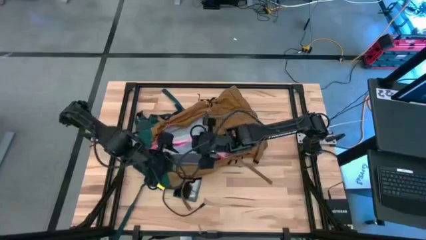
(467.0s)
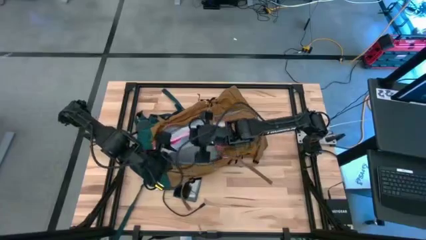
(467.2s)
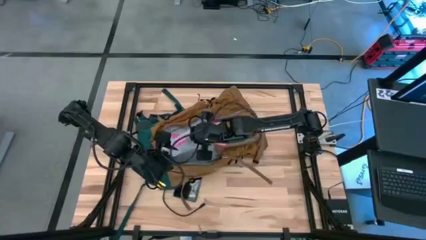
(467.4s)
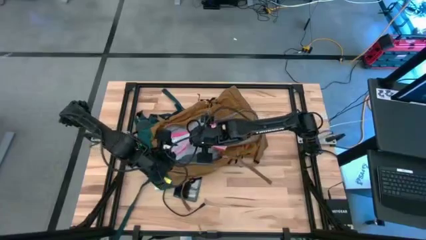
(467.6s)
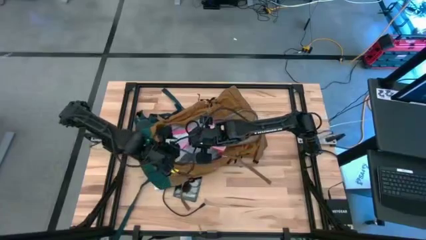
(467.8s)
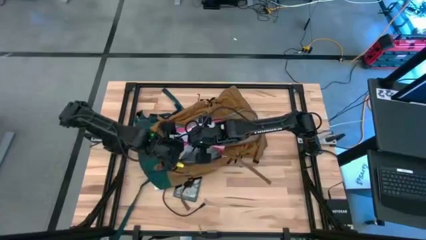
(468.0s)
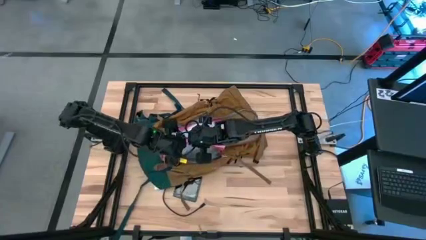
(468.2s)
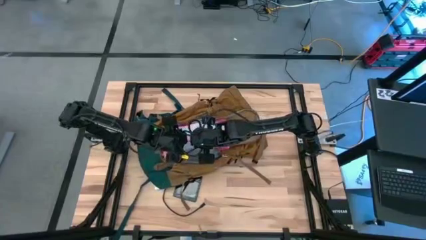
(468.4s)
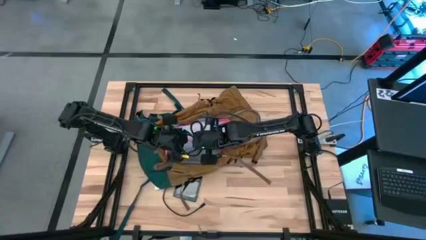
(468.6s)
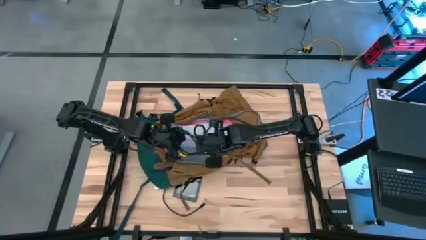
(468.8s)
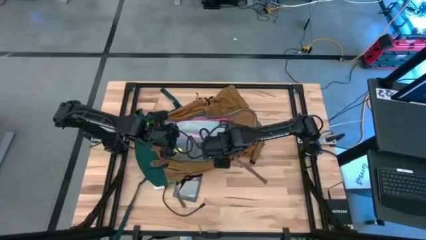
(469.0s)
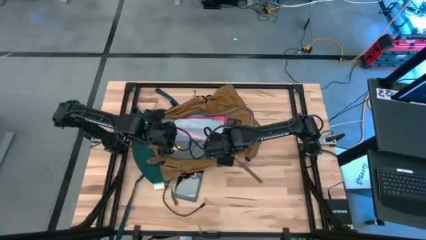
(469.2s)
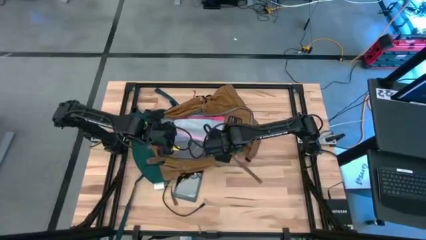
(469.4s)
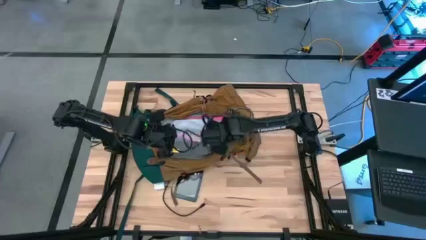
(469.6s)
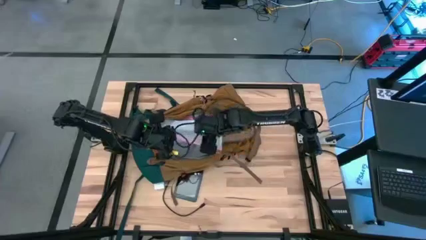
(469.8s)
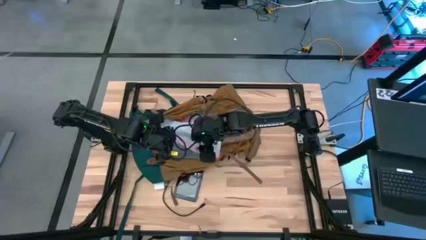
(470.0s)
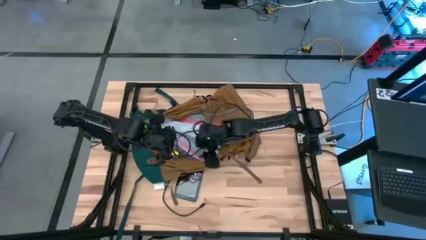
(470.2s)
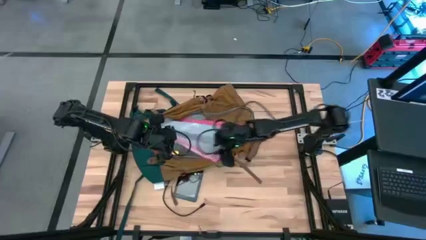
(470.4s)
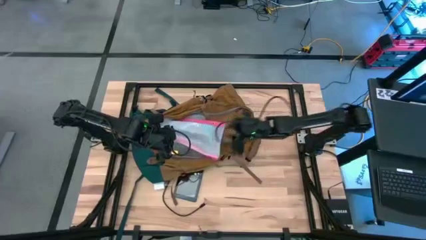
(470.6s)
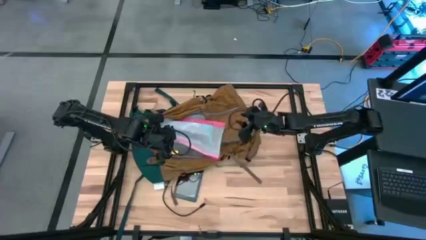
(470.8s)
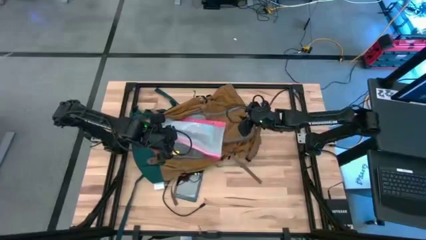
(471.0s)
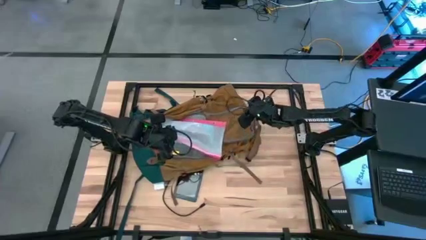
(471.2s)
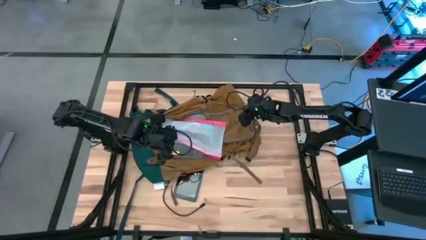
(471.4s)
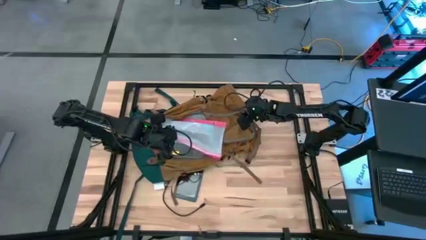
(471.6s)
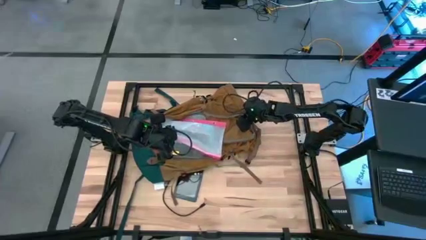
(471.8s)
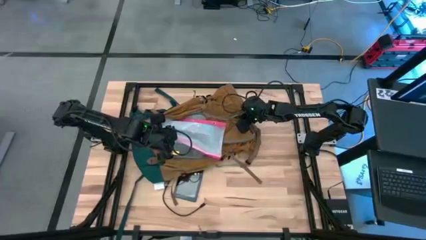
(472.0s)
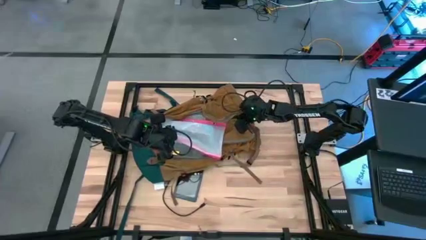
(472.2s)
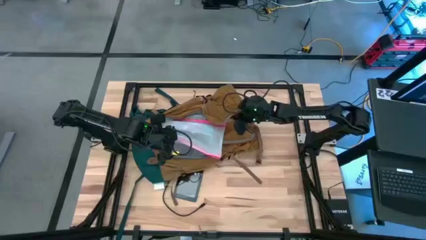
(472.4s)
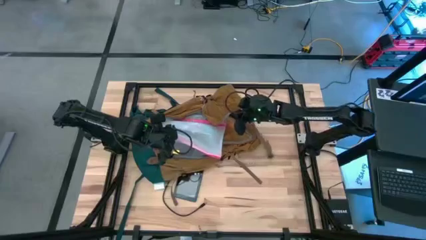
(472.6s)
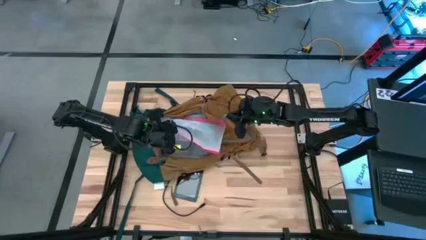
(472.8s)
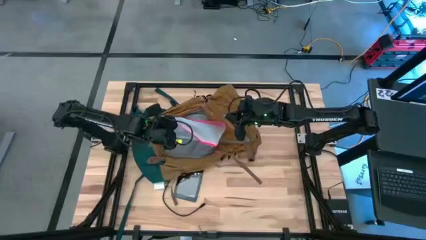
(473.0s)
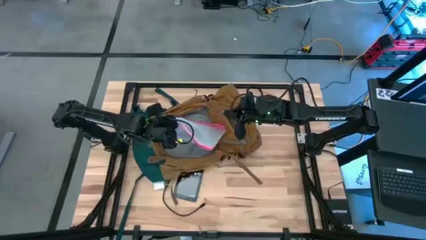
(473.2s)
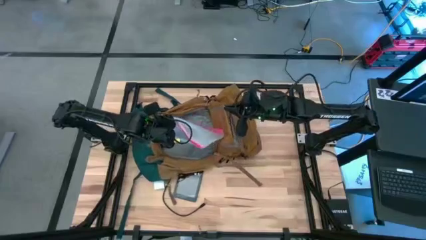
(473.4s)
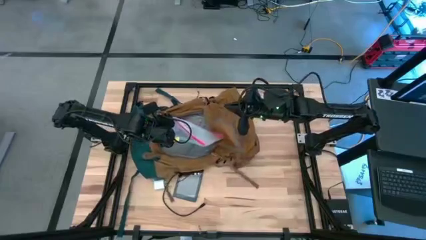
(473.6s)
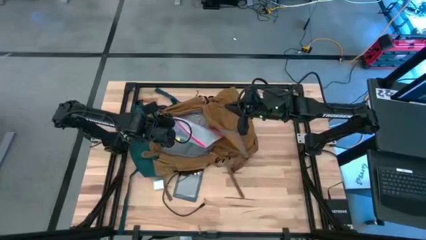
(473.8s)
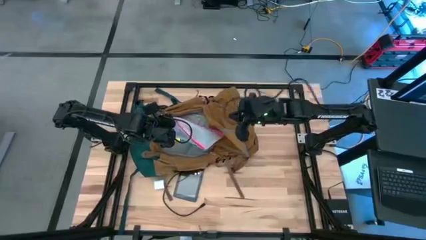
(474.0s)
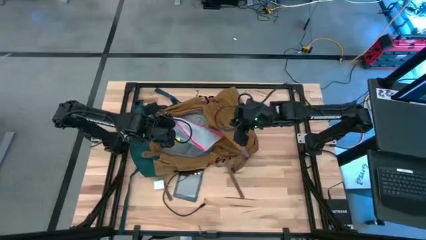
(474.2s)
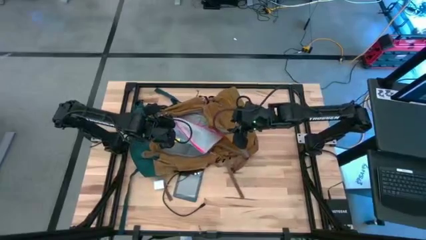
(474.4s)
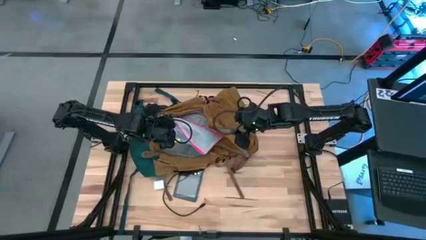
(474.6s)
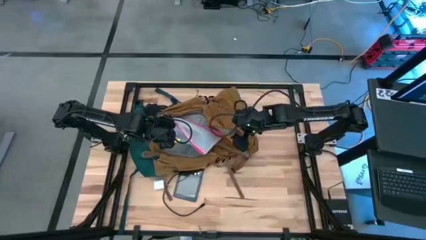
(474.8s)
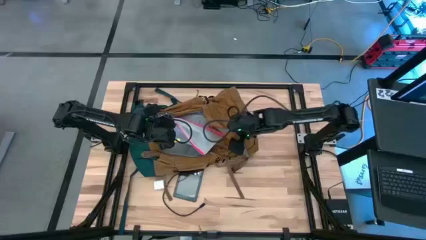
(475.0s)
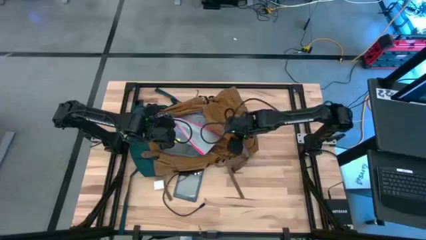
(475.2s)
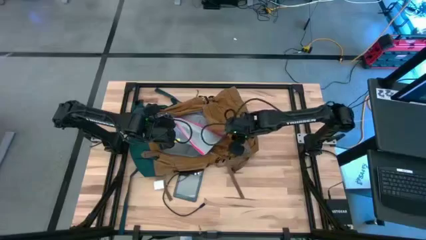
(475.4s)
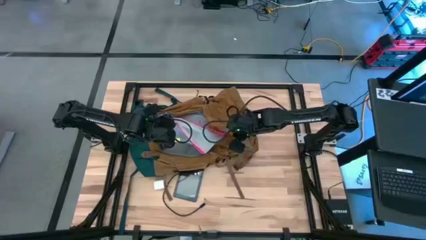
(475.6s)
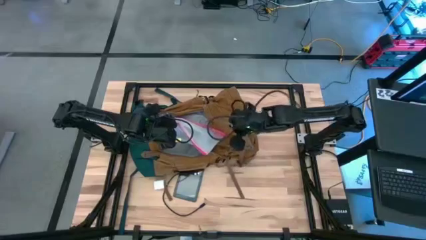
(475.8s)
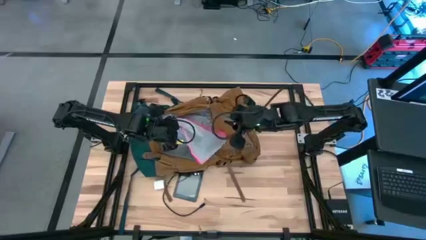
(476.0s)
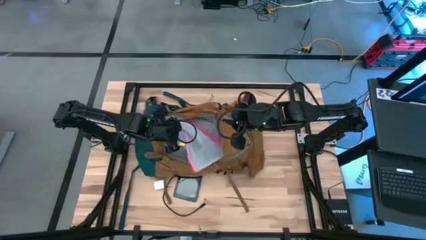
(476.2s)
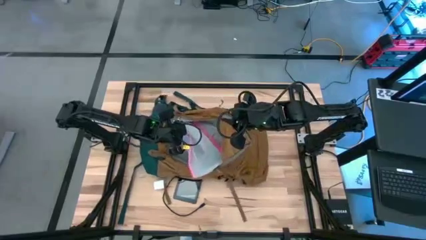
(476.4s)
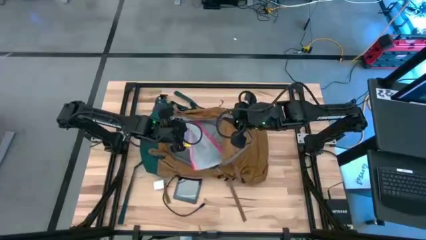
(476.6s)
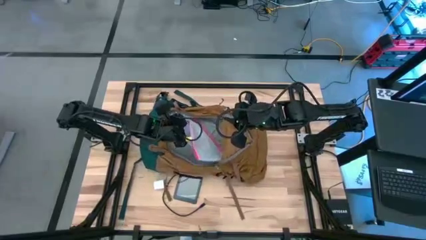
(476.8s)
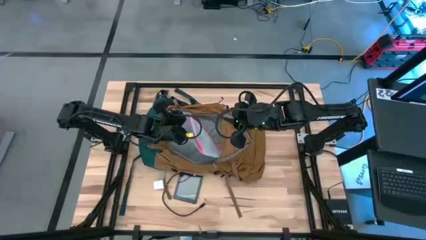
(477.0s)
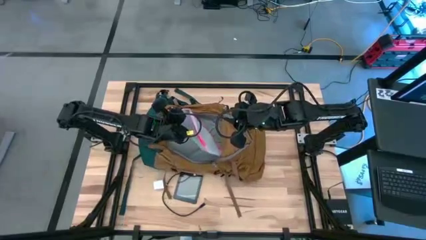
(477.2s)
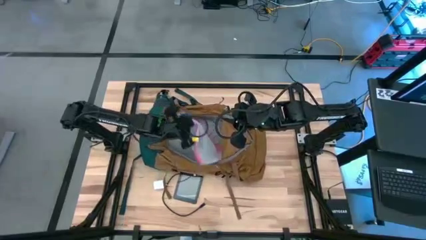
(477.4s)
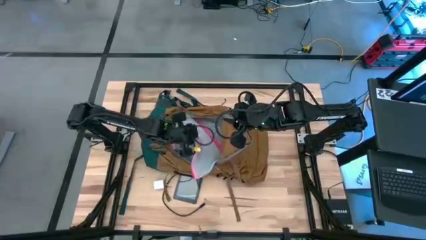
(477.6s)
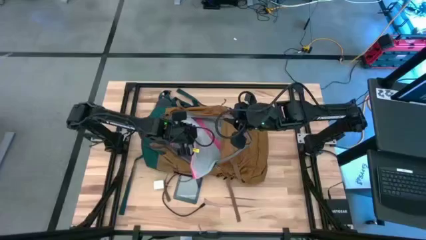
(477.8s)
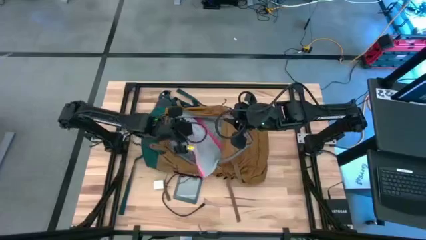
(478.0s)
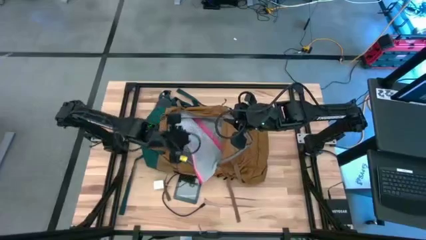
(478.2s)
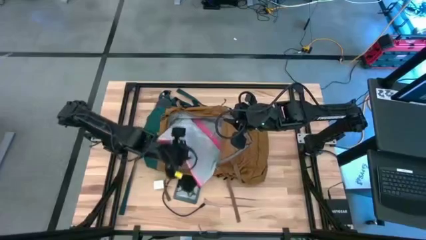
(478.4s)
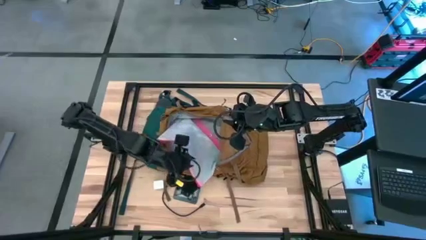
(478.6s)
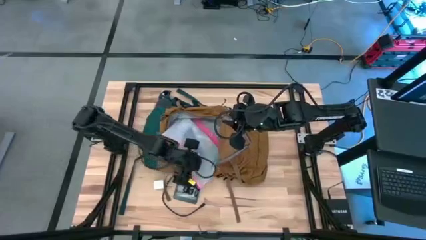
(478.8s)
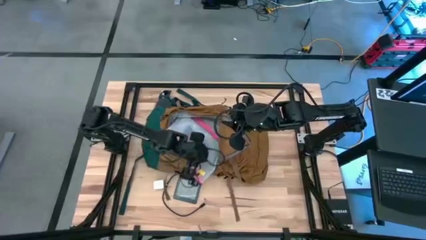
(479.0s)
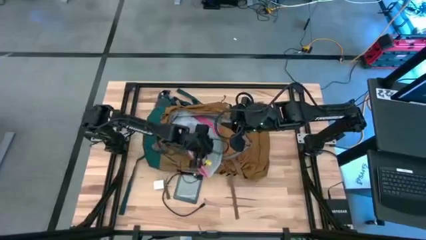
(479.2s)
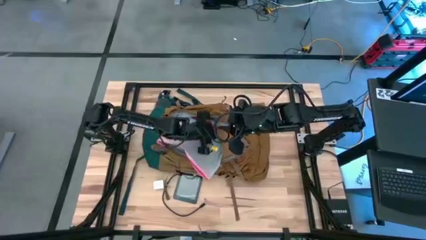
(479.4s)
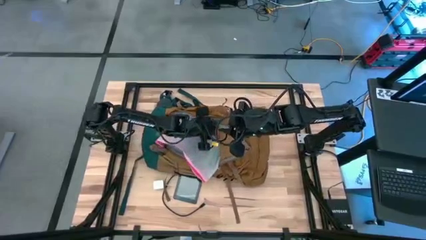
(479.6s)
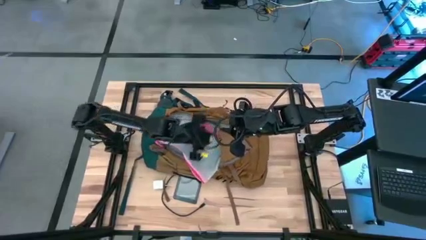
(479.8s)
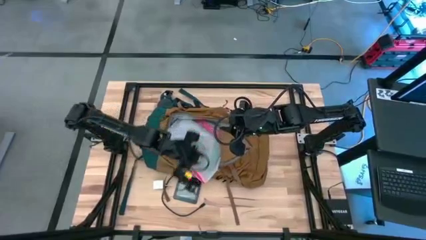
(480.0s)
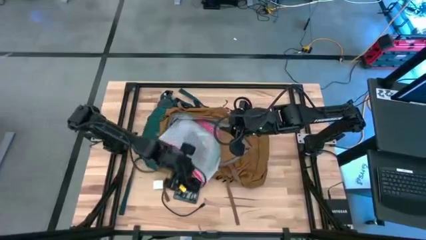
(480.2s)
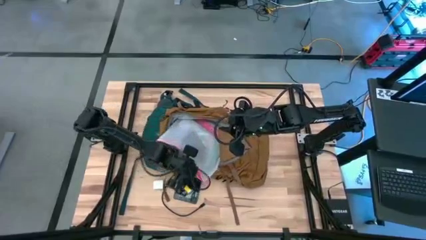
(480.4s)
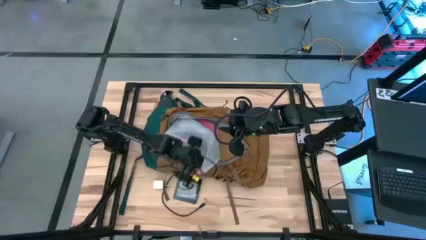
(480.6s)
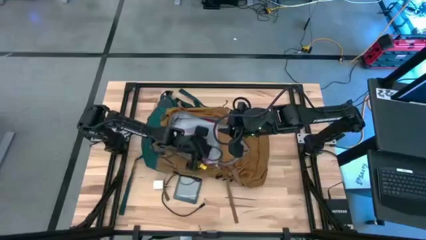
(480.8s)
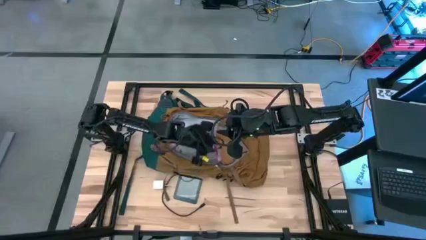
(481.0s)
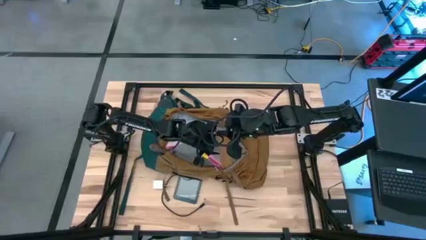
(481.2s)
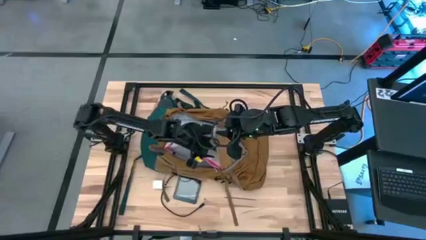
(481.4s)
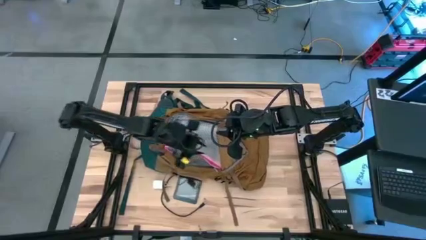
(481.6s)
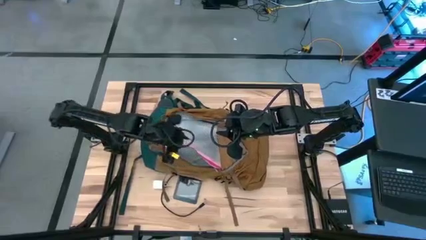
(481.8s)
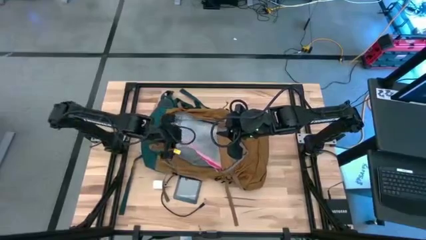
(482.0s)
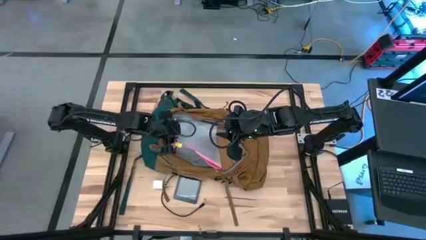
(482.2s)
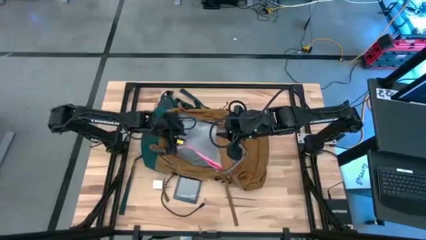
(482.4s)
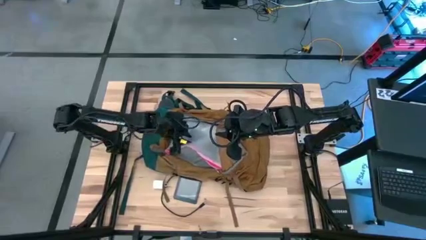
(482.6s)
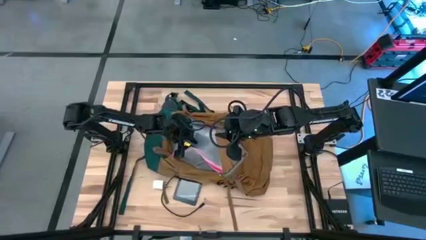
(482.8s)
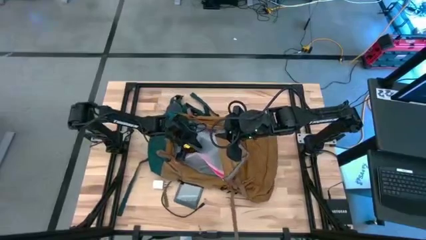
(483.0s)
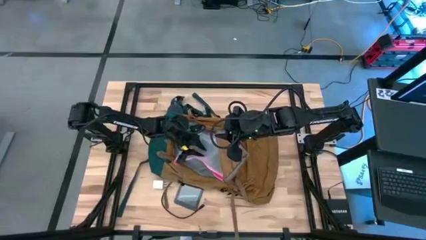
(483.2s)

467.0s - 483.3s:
Task: Unpack backpack
Put the pink zipper pouch into the brown backpack
